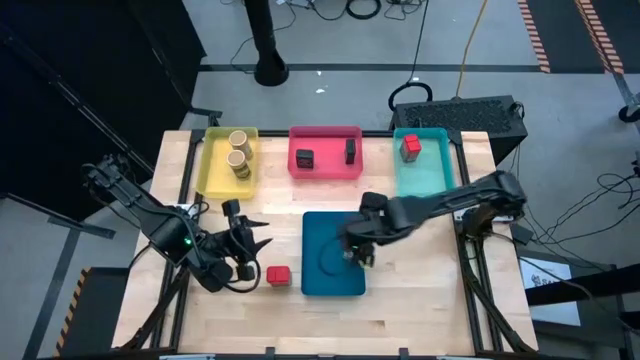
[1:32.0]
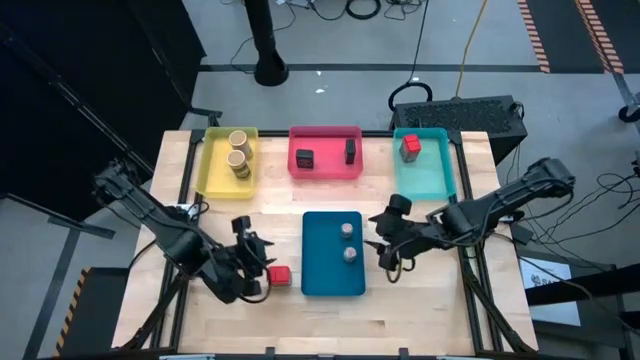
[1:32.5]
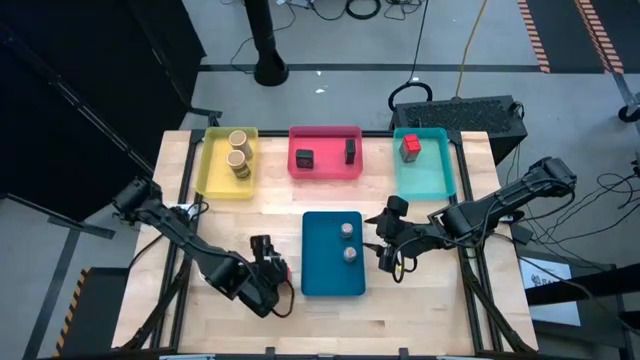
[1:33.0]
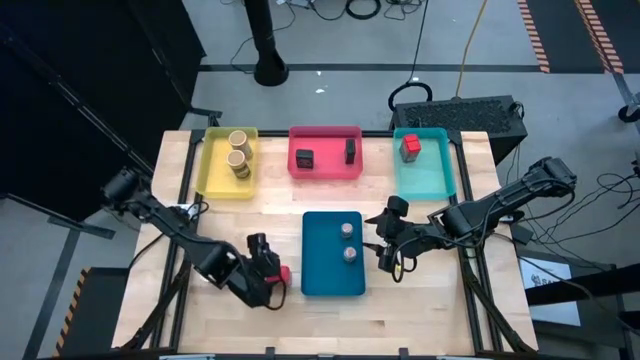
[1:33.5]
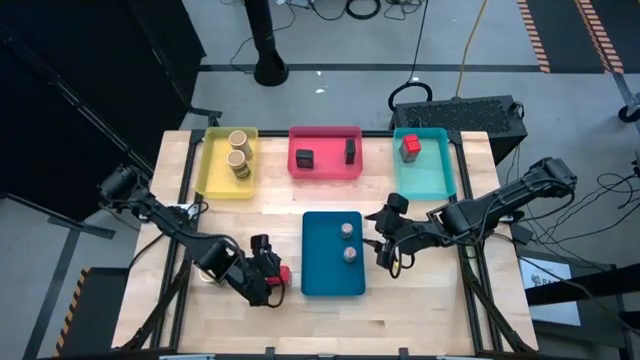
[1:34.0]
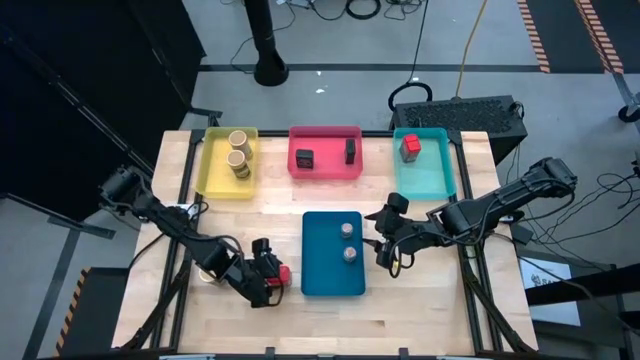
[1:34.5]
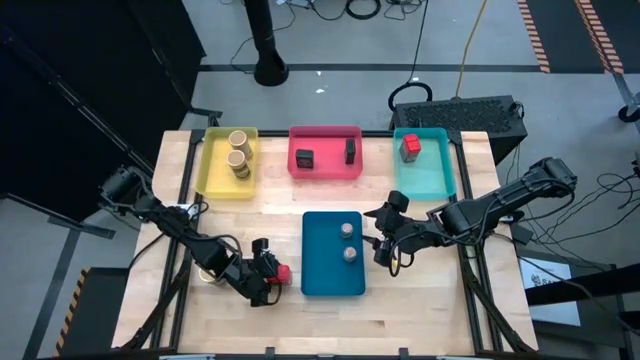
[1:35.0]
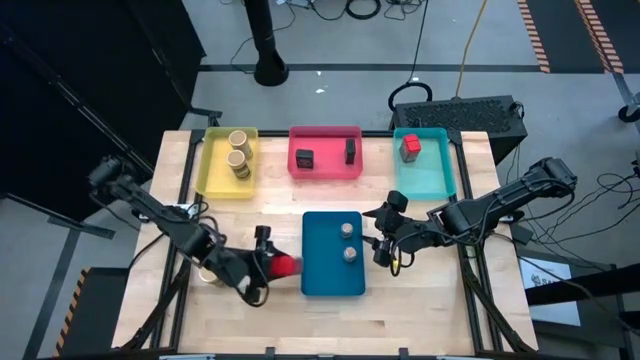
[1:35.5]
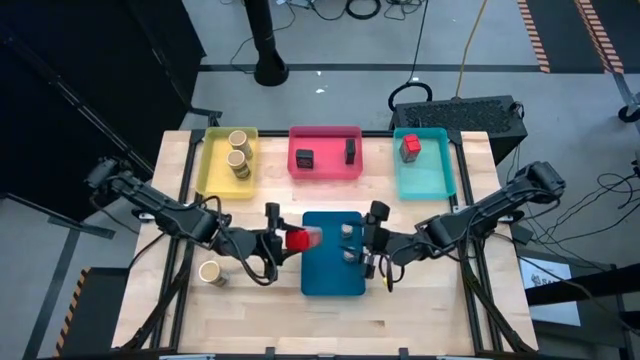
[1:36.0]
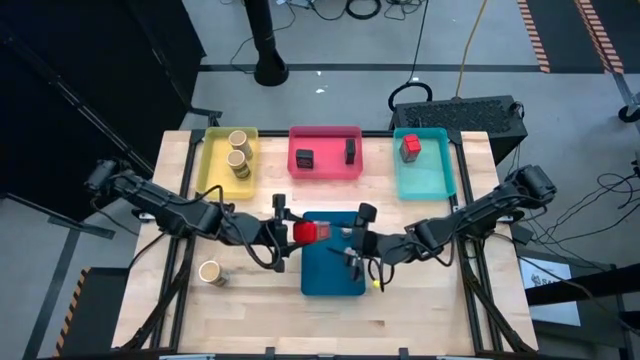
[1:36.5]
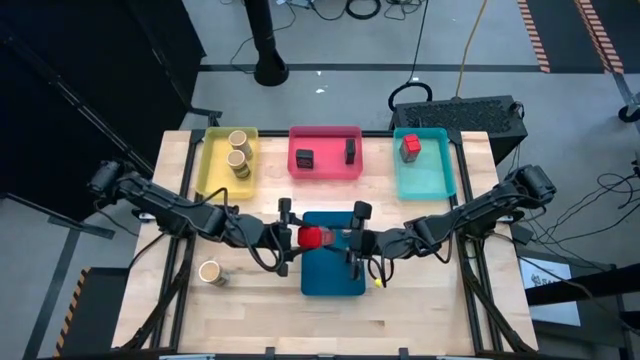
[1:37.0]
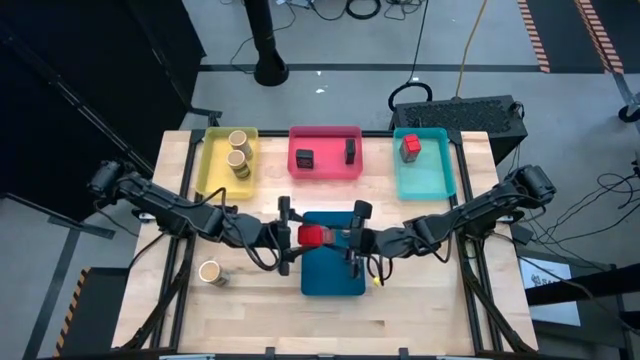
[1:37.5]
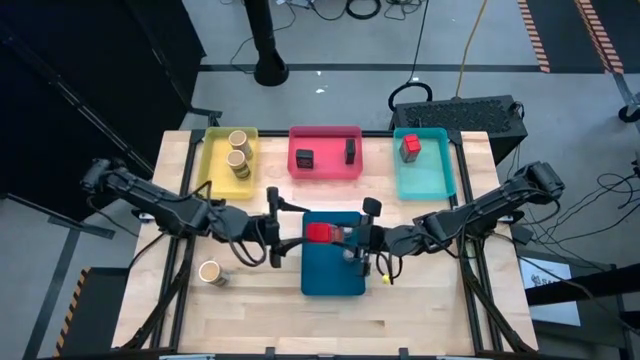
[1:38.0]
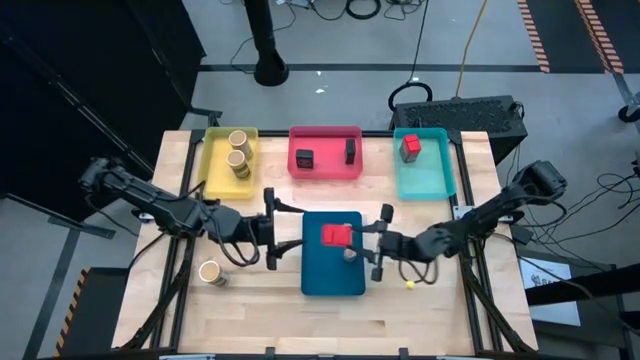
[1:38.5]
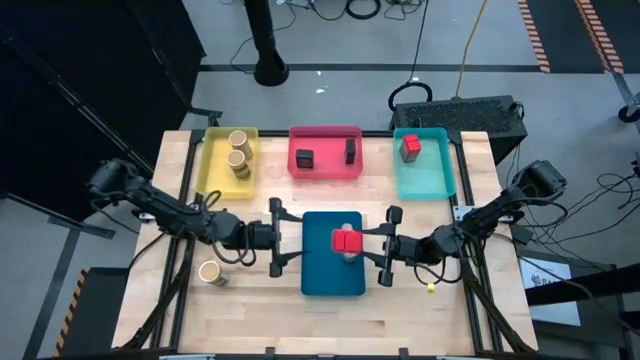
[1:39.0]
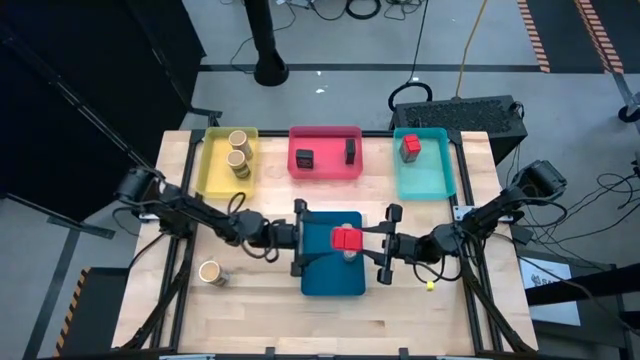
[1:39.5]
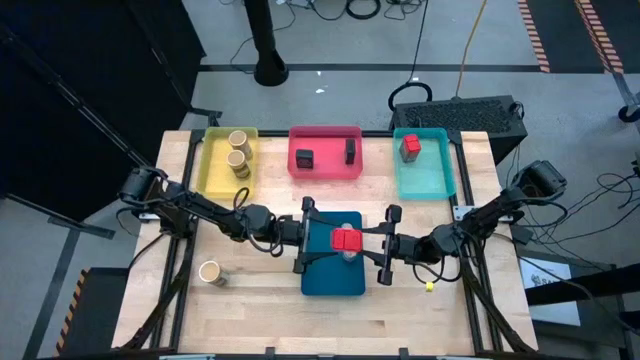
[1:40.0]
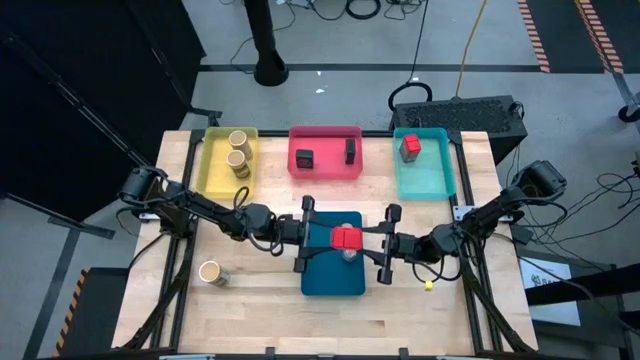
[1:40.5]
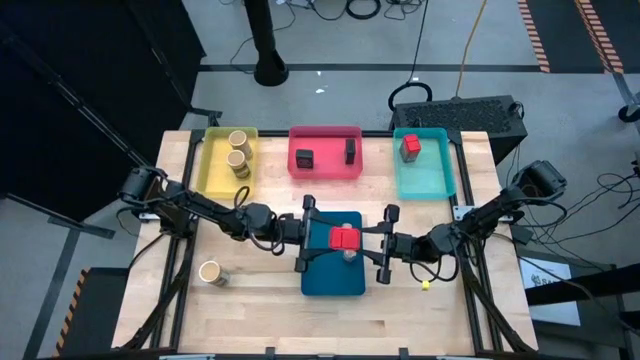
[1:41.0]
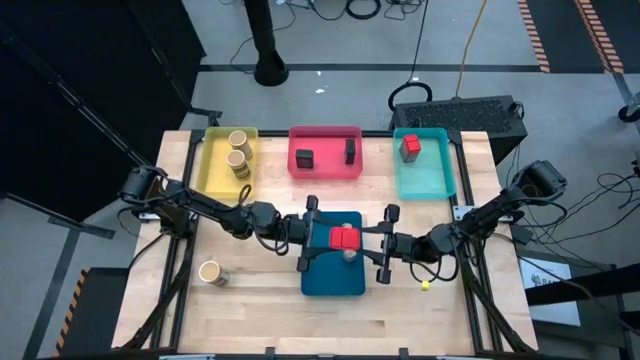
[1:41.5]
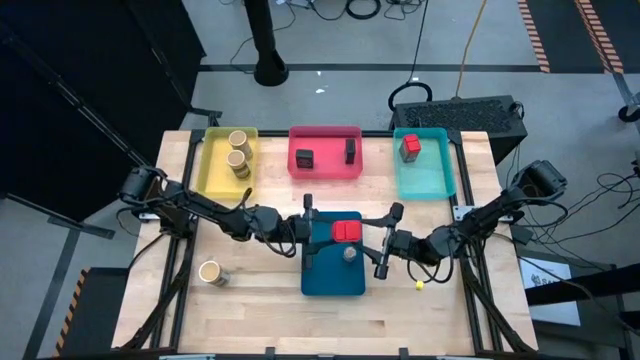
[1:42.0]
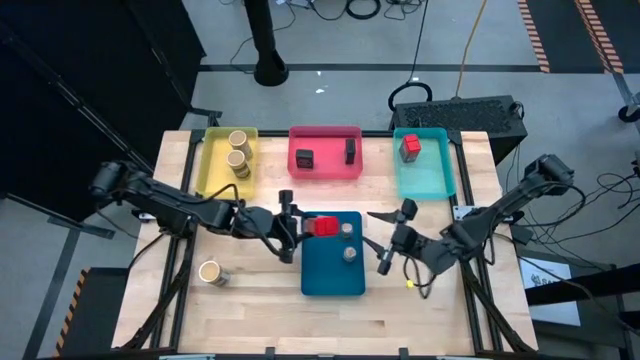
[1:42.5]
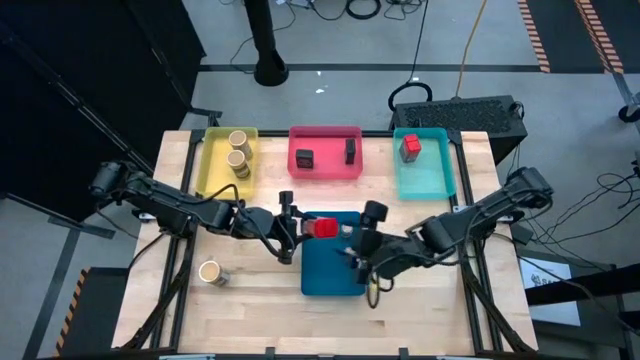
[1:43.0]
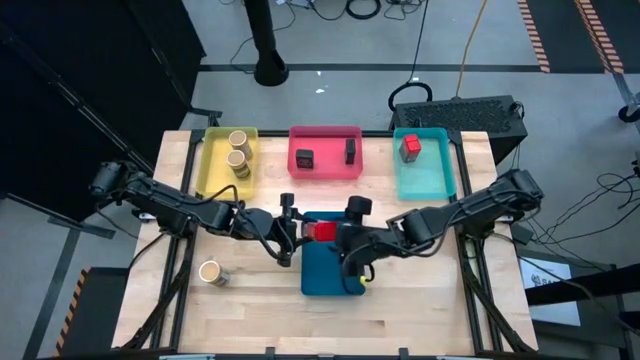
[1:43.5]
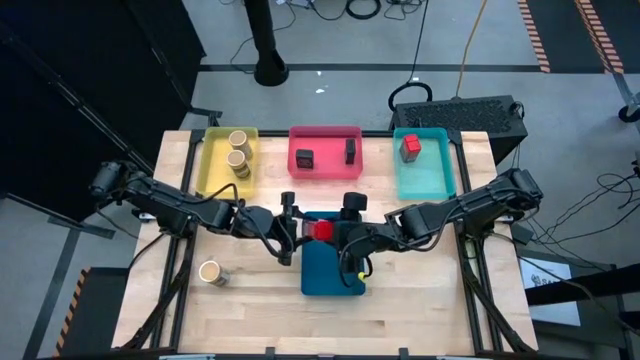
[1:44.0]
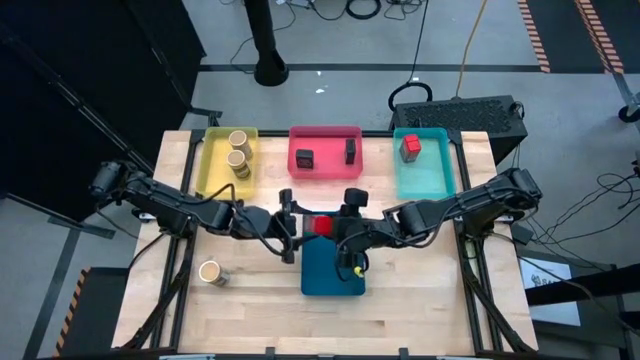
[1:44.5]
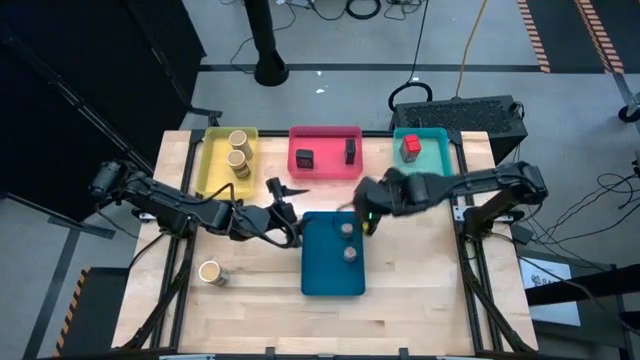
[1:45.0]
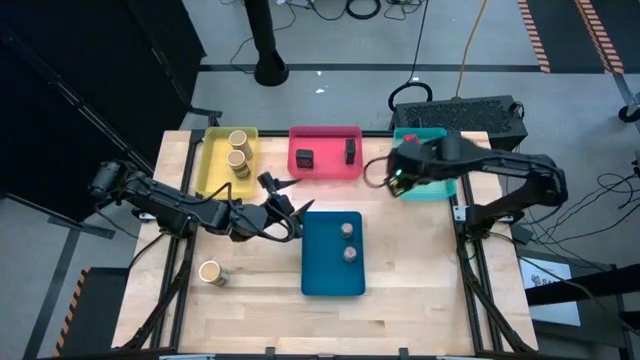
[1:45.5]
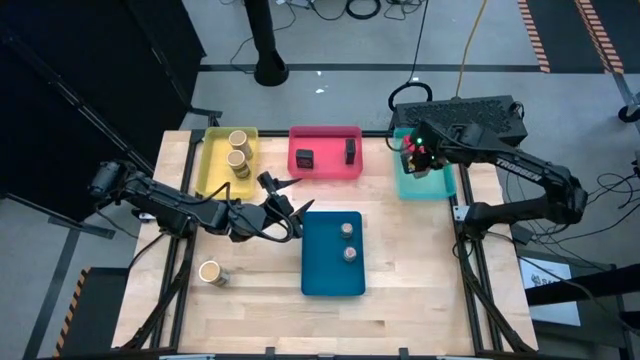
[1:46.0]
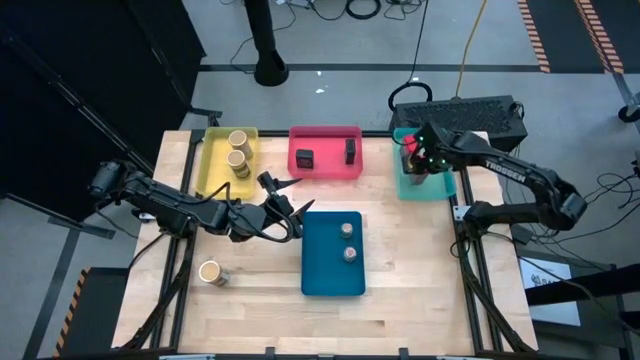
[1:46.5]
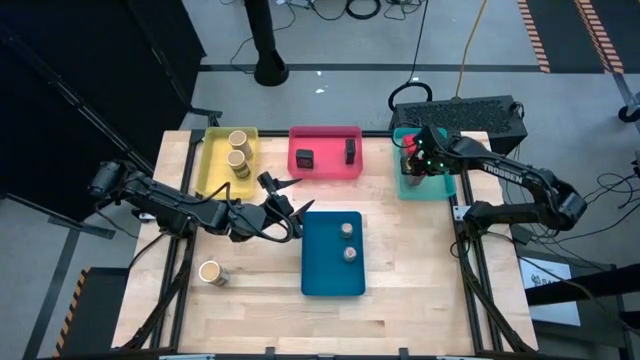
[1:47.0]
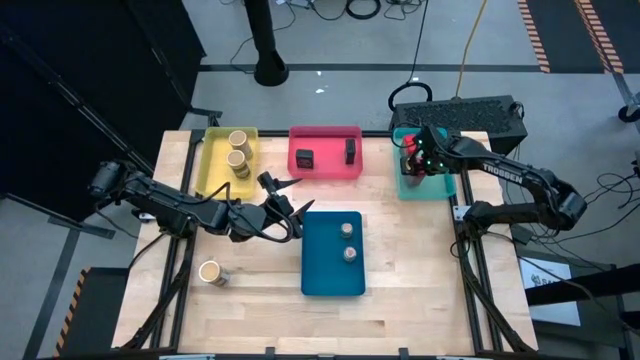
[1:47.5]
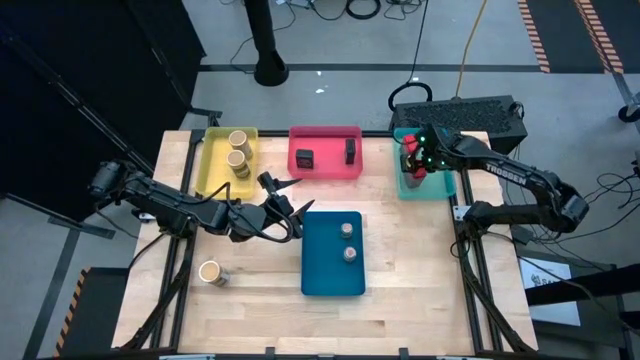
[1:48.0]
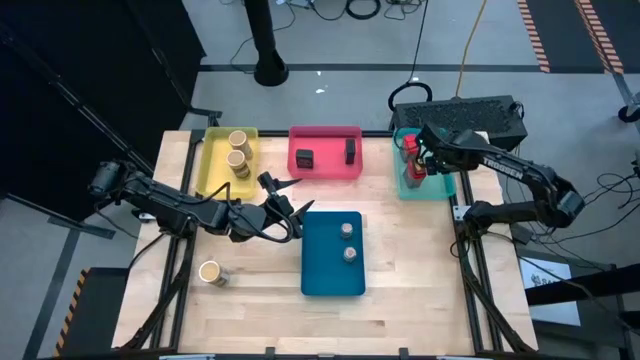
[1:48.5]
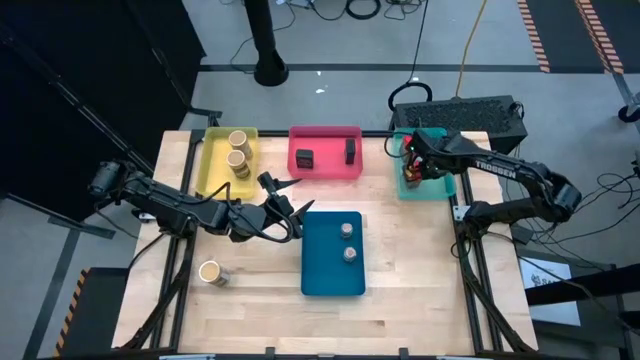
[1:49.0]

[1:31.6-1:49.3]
Task: Sort spices by type
Put the red seasoning can into the green bin

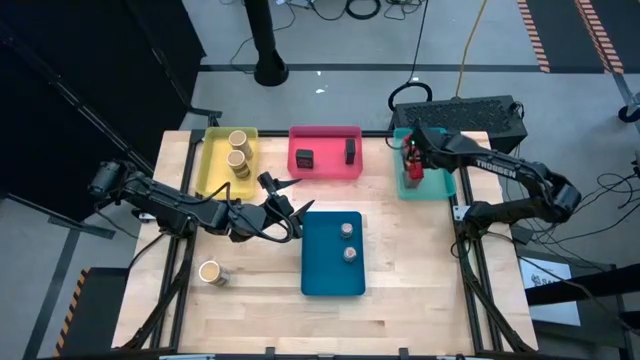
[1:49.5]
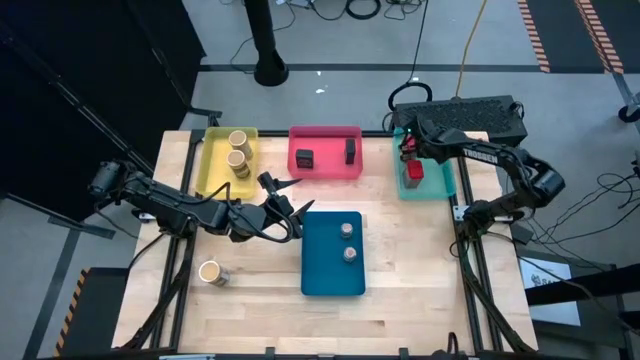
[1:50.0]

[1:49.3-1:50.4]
Adjust the red seasoning can in the green bin
